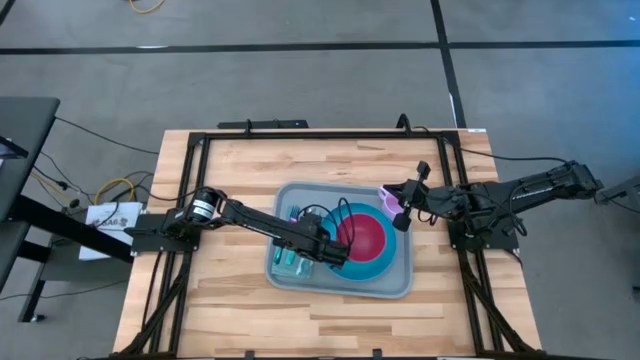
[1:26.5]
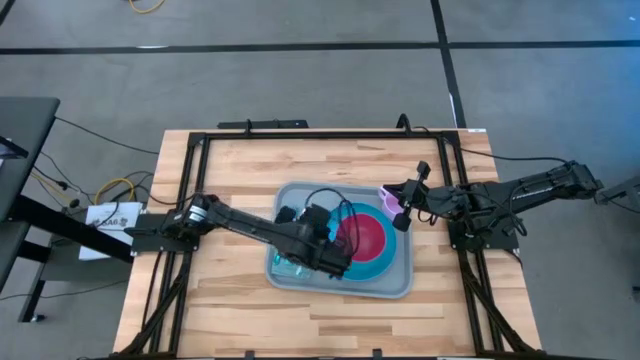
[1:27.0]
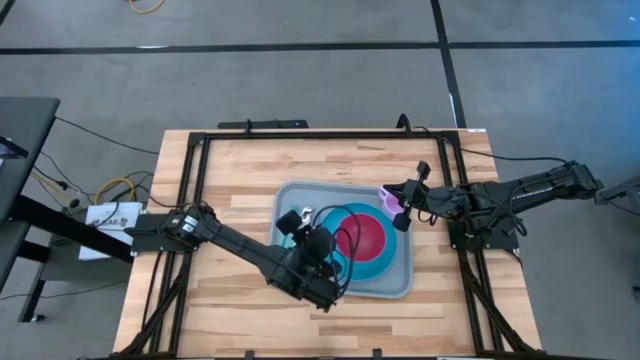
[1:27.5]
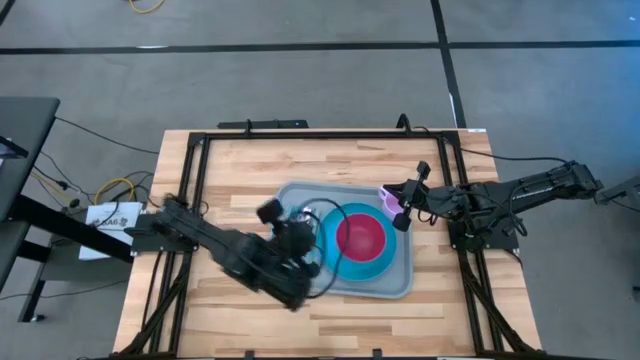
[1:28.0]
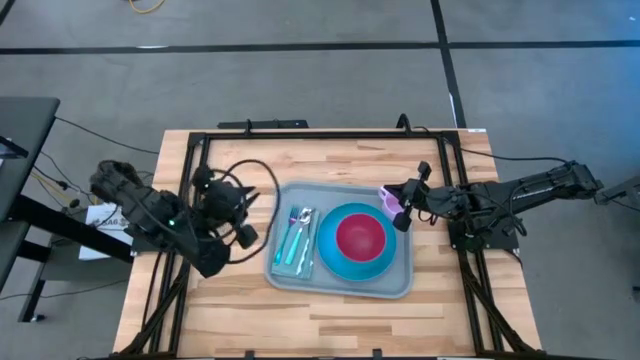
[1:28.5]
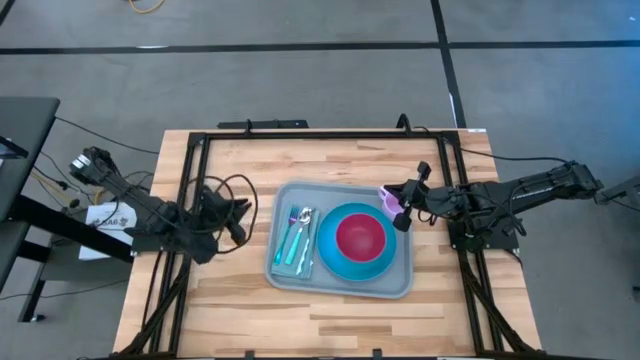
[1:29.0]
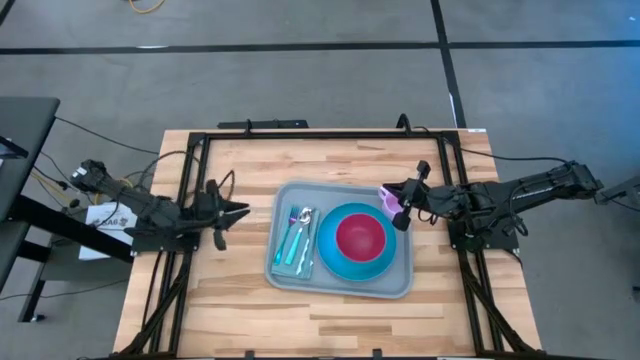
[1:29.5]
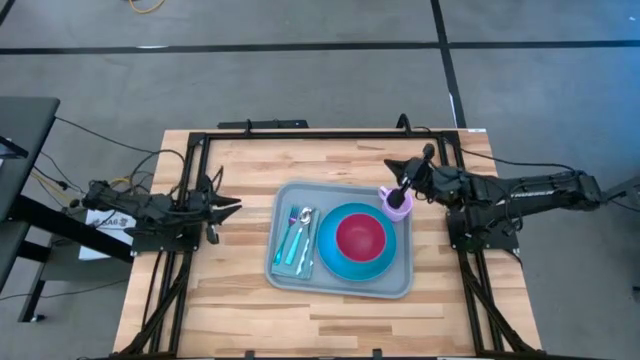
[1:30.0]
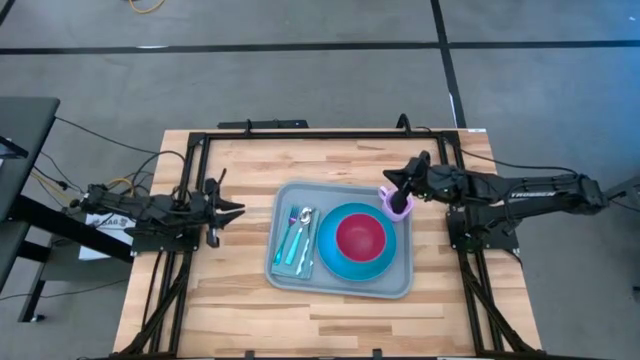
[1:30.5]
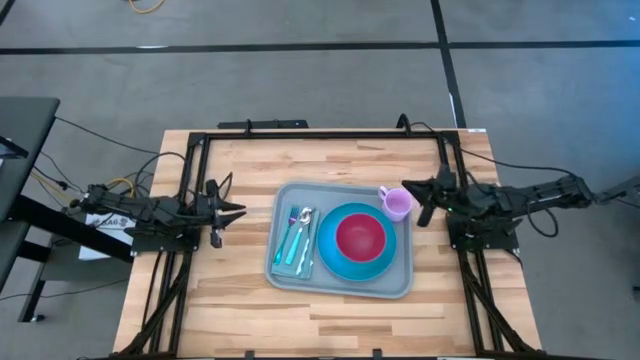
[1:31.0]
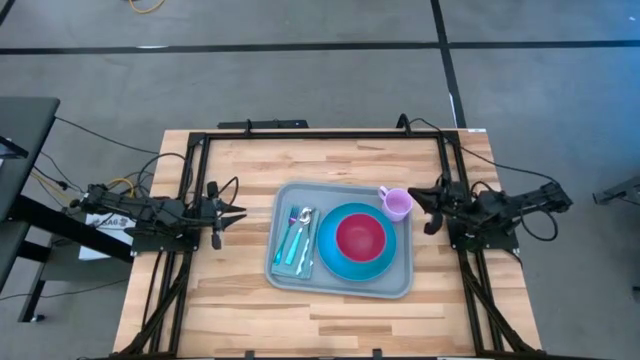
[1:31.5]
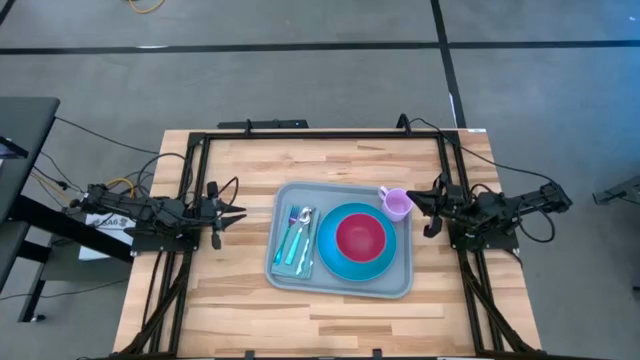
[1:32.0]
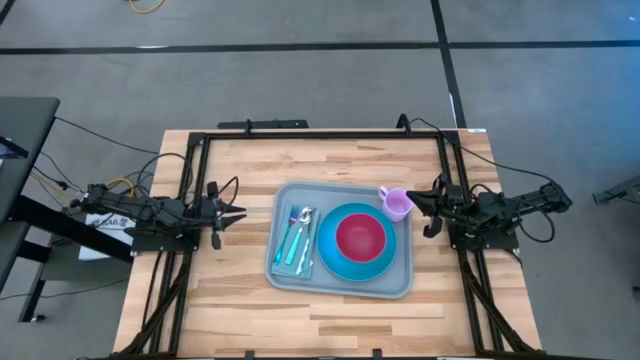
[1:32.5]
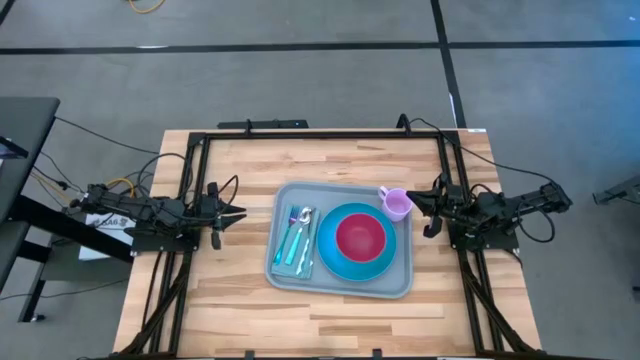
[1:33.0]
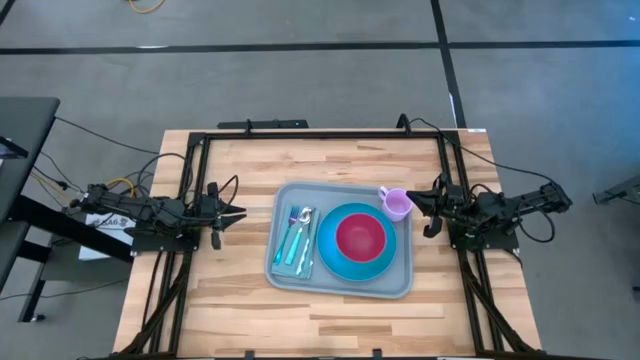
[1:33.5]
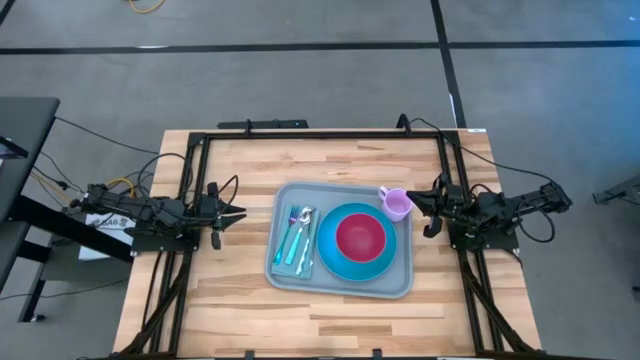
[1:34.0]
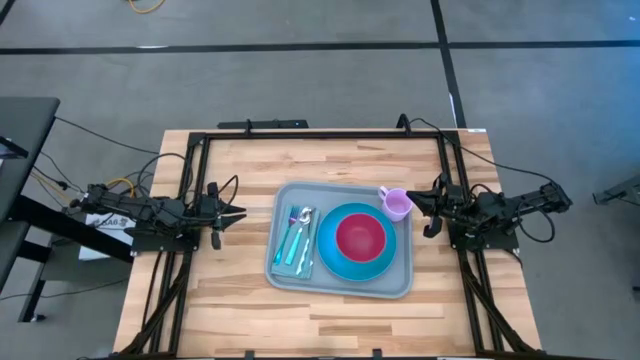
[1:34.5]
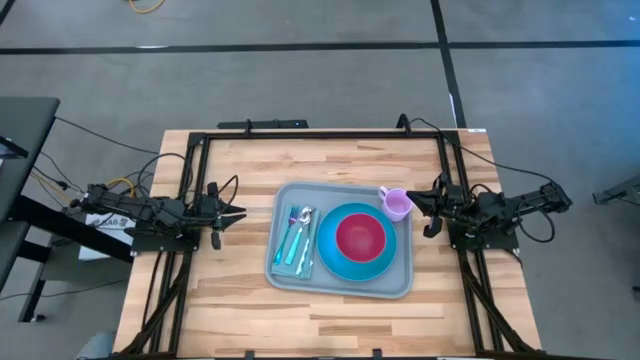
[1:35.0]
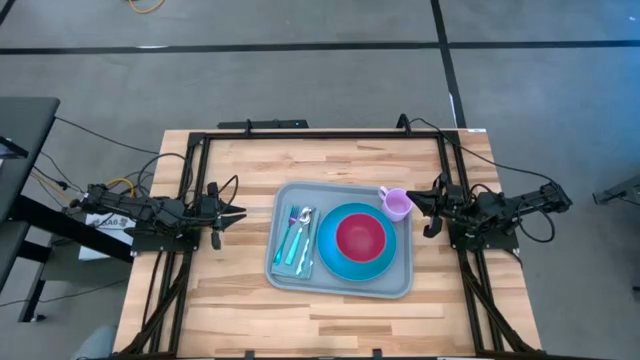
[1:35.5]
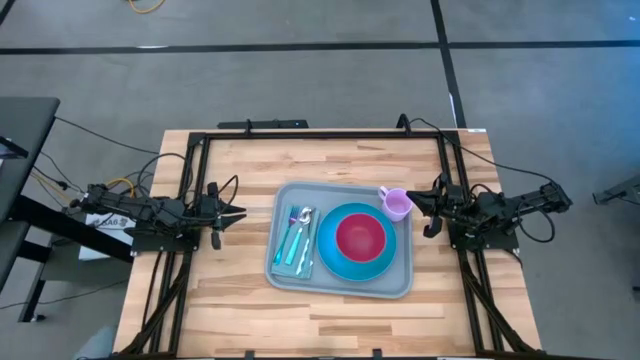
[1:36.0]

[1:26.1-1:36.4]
Task: Set up tray
Return to Home Position

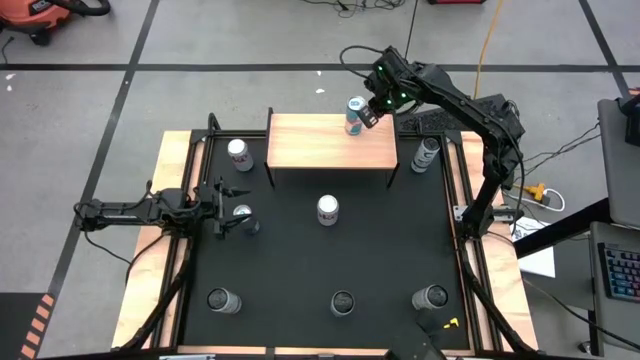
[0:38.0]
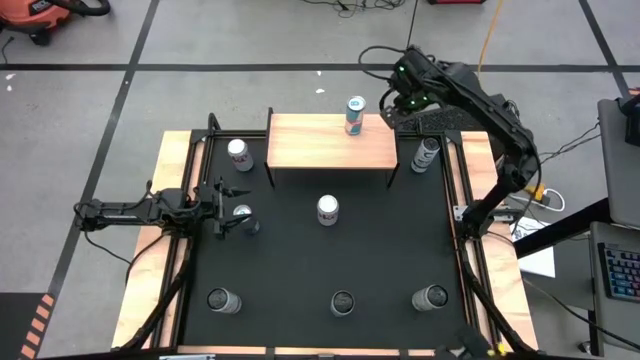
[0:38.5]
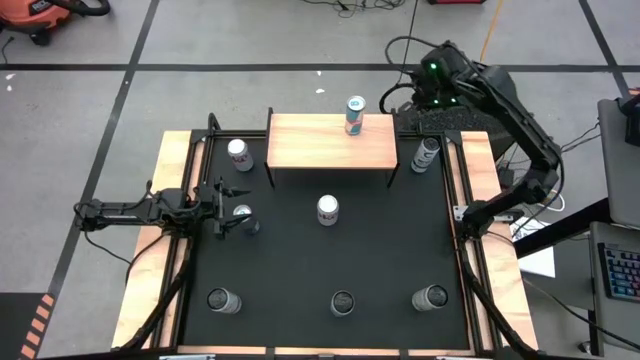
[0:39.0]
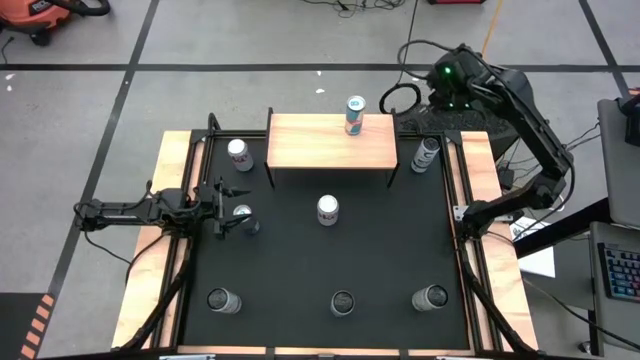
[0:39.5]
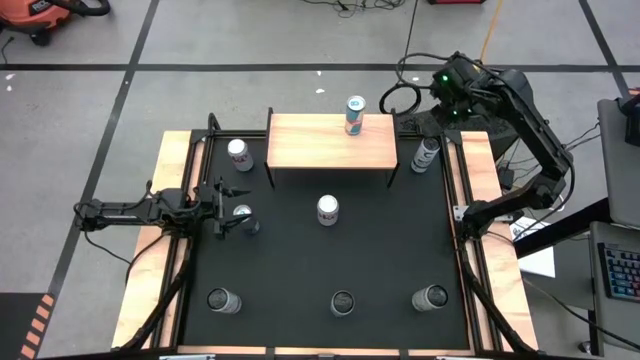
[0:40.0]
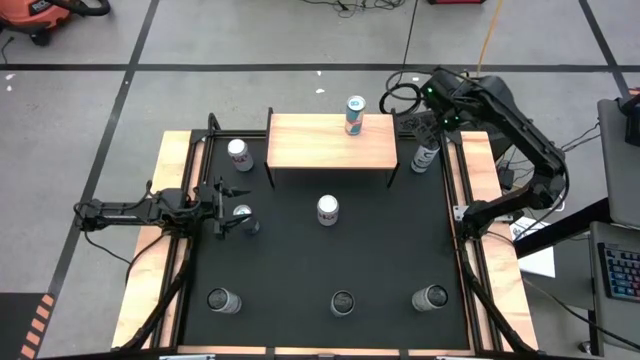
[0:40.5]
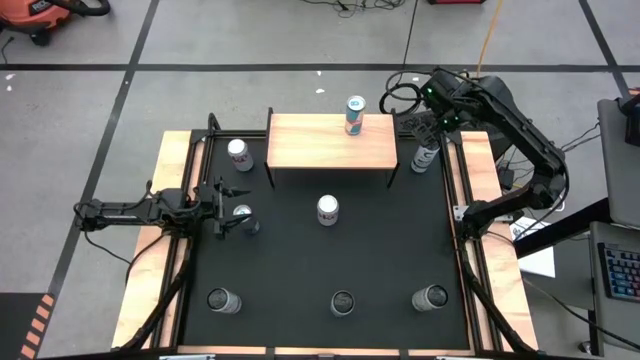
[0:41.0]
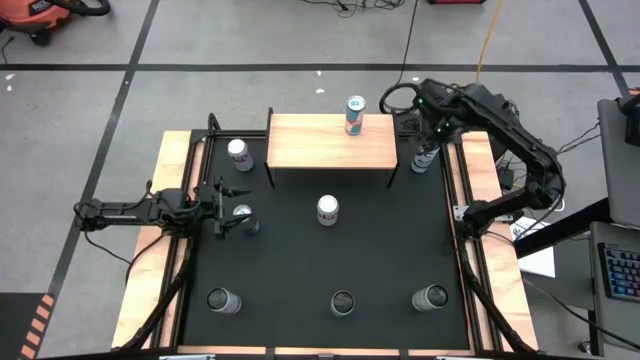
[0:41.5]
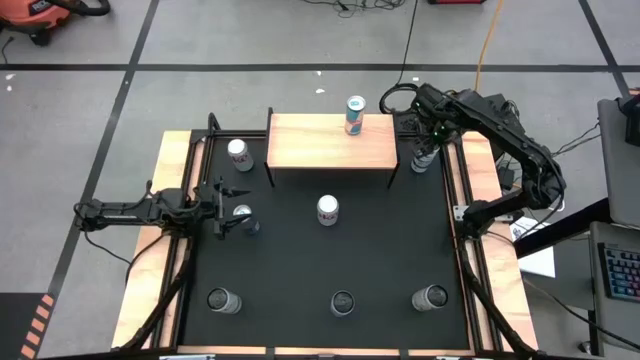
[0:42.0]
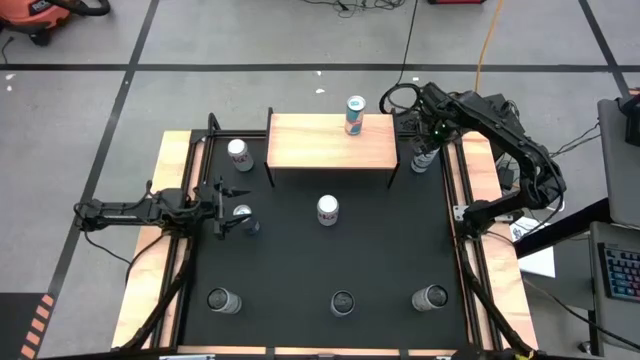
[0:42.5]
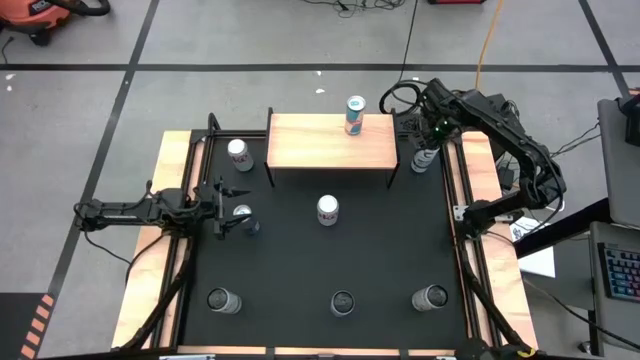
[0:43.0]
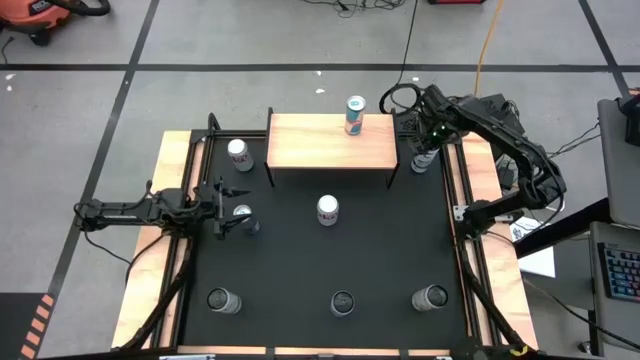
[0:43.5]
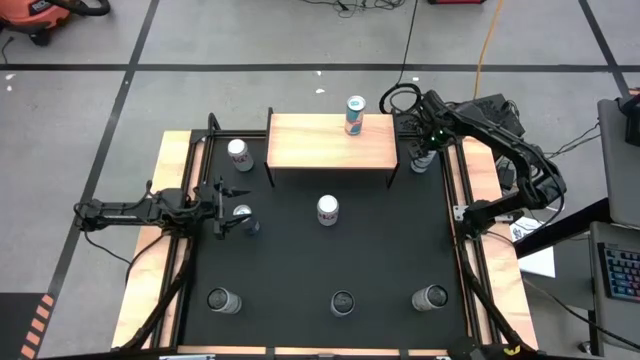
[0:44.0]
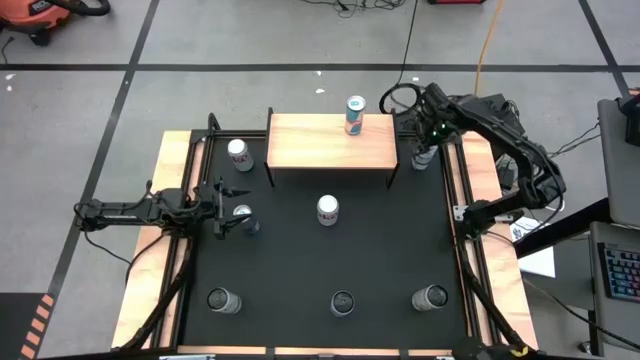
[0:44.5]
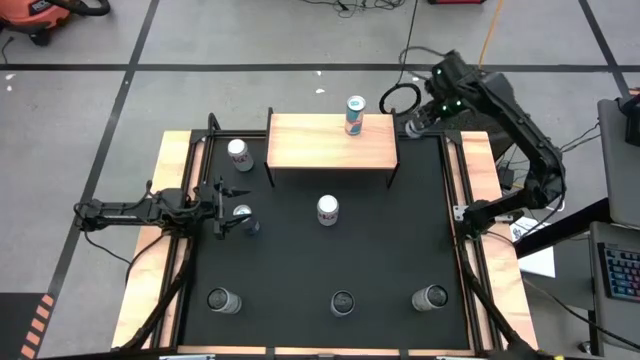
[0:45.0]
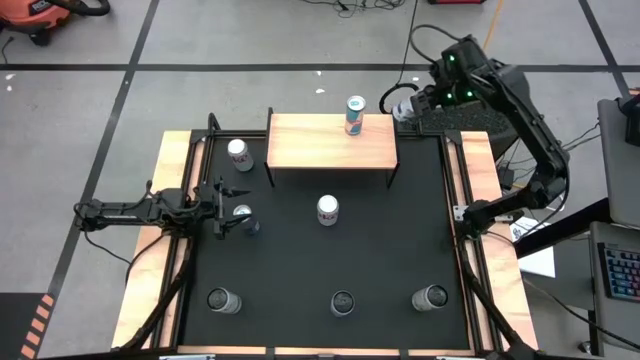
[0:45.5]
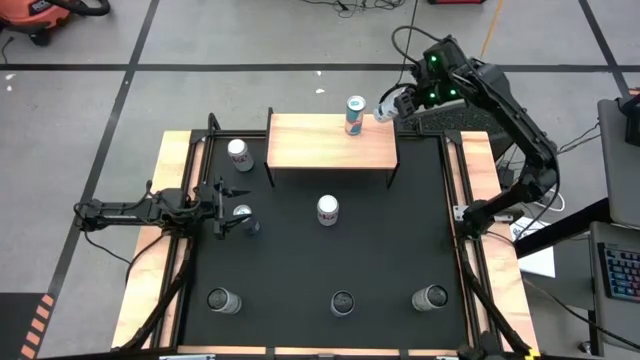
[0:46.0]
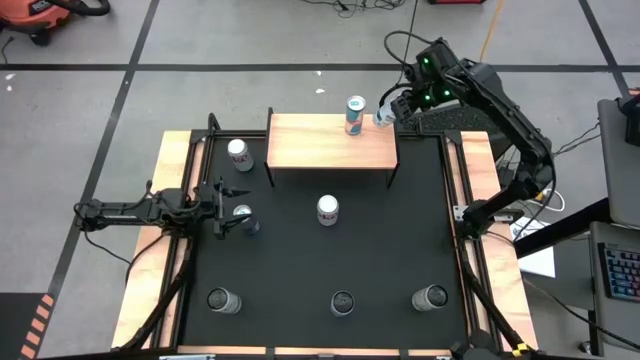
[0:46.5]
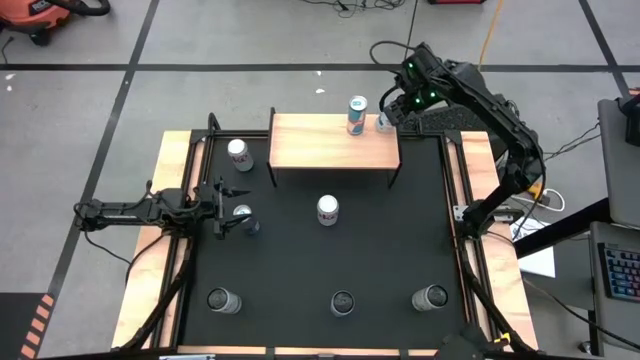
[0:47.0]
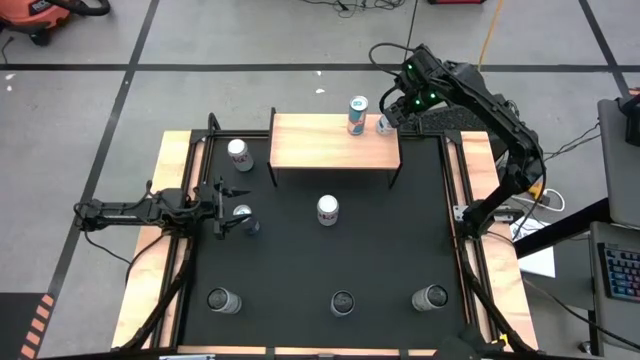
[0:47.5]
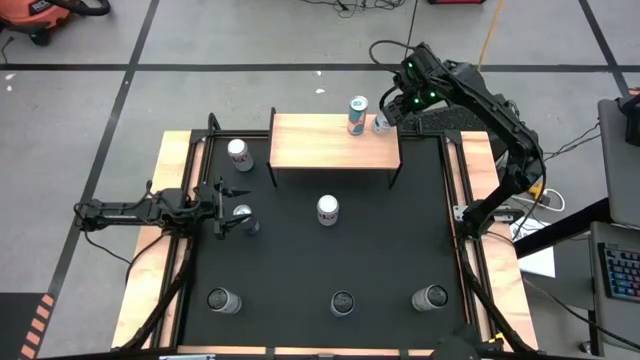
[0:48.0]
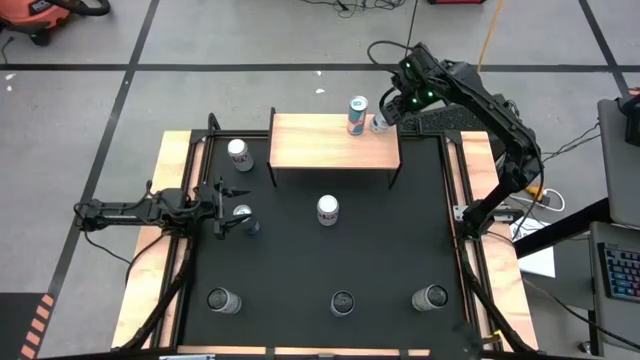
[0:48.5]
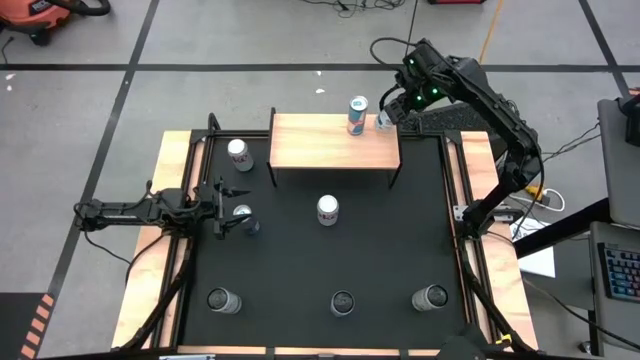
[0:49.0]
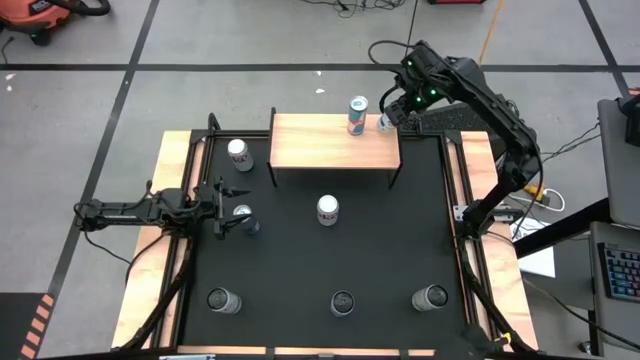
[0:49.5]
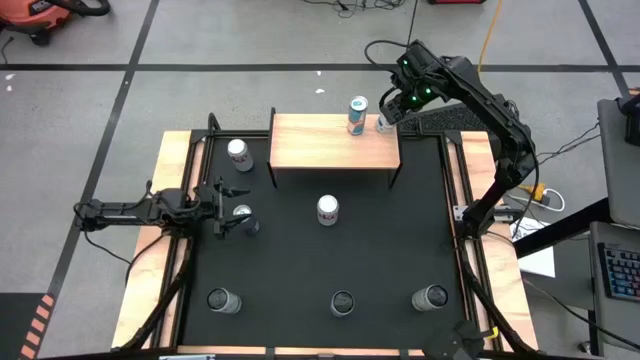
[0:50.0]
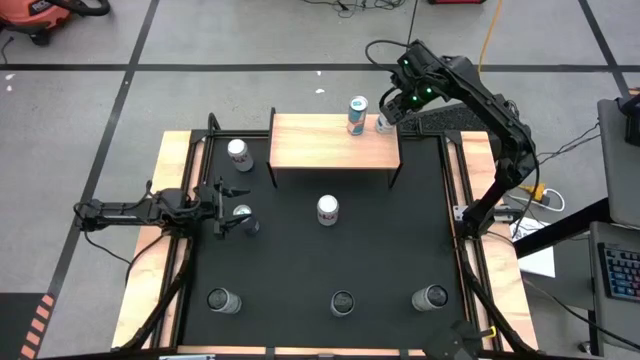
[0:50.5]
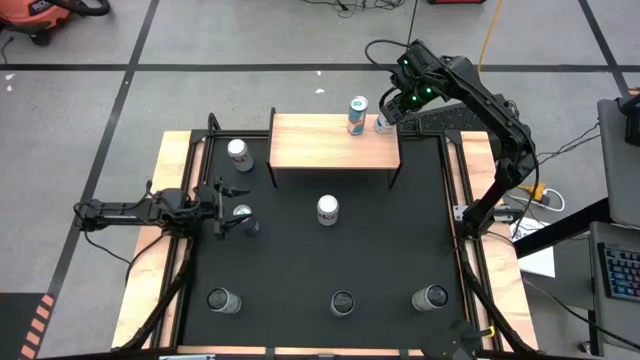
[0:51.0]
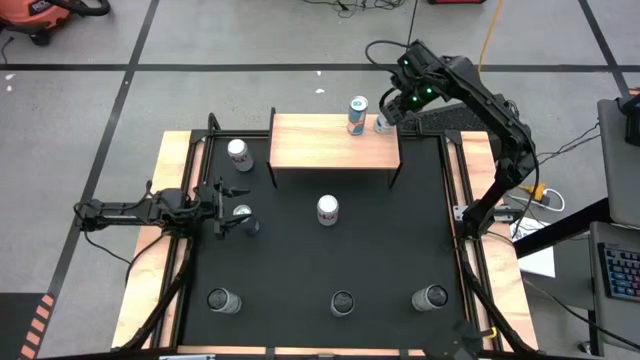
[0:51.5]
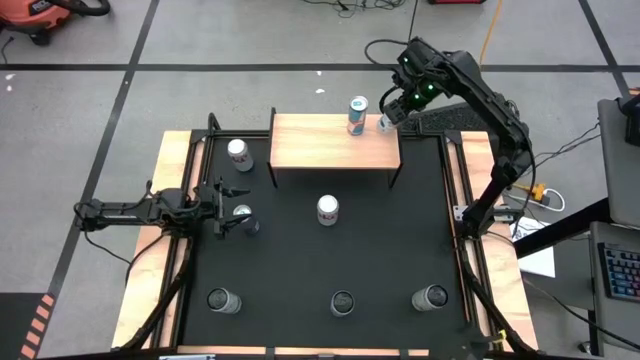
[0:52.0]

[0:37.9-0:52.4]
Task: Place canned beverage on shelf
Put the top white-blue soda can on the shelf
